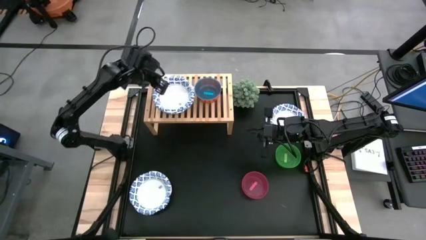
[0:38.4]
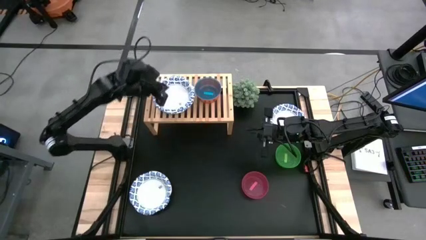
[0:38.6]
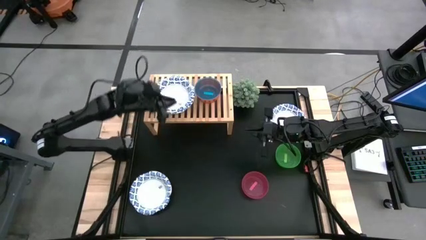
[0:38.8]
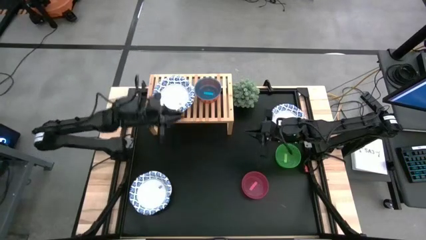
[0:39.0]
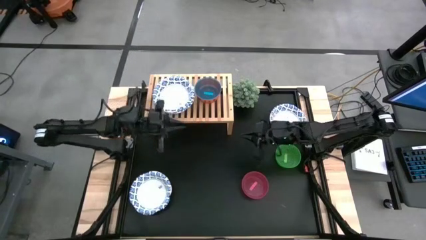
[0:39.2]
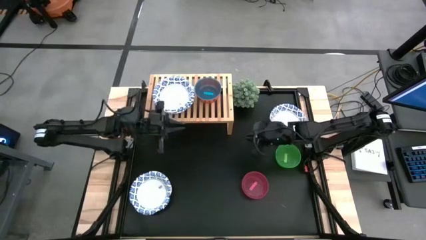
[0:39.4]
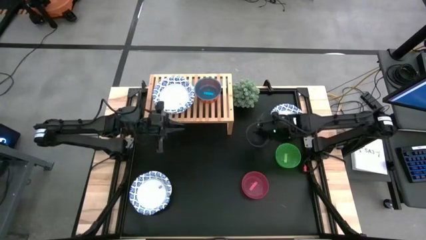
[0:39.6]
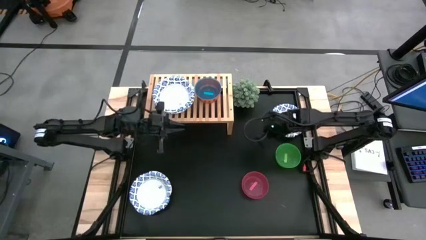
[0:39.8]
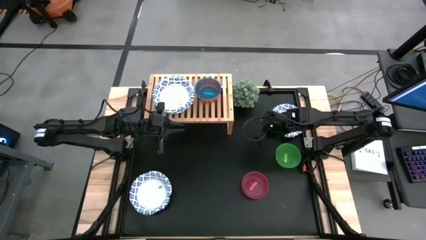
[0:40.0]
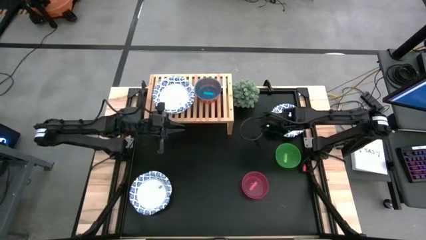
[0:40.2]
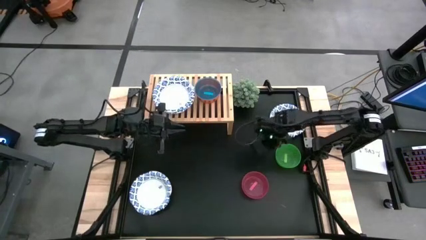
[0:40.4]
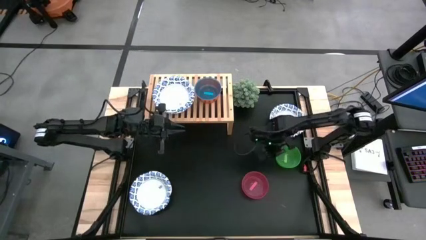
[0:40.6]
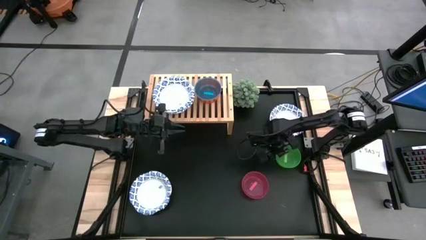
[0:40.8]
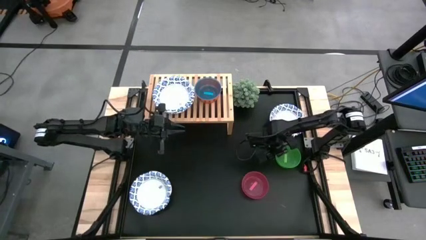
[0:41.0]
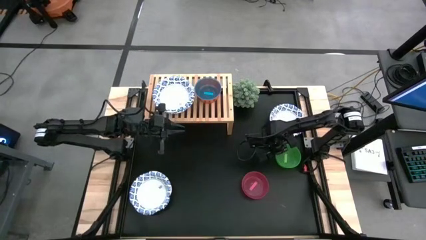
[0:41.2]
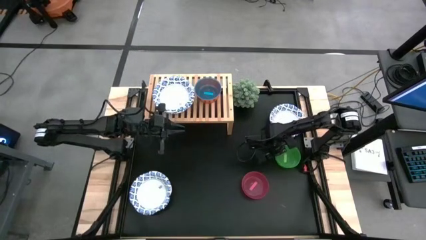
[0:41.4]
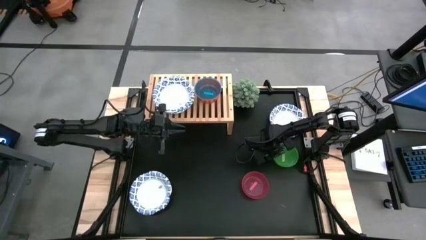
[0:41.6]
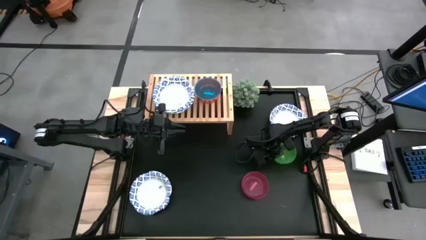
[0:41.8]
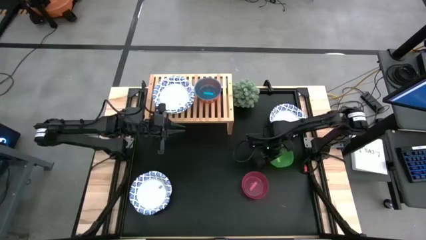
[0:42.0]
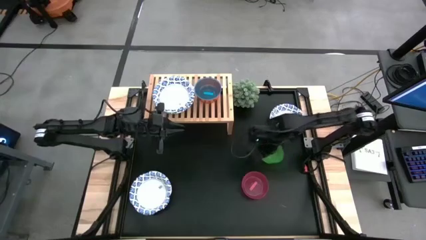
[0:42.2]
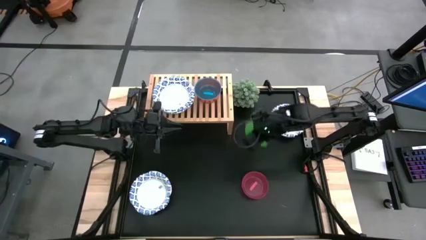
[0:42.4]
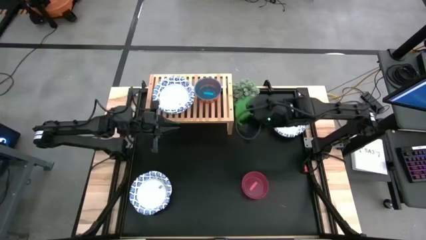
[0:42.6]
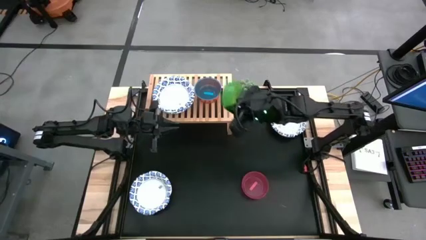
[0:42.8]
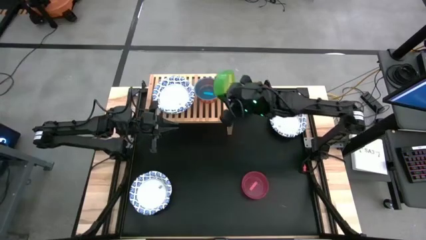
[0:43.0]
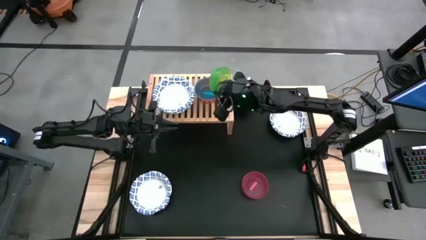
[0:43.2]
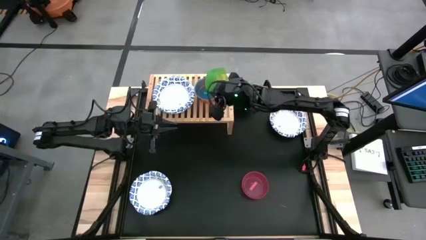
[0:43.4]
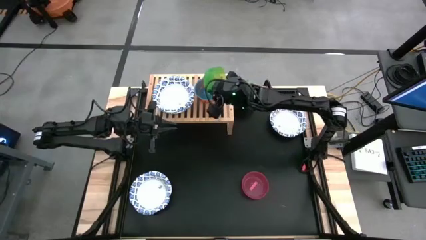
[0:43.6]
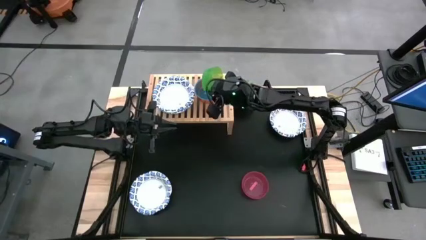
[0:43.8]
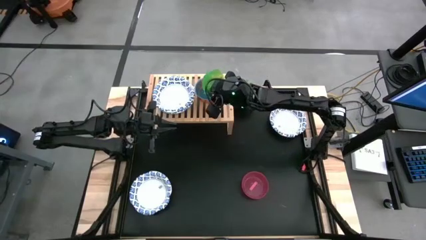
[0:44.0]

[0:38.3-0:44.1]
Task: Place and stack bowls onto a shelf
Stack the green bowl on top of the blue bowl on the shelf

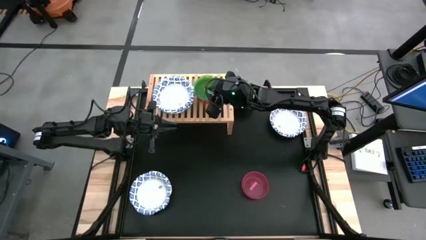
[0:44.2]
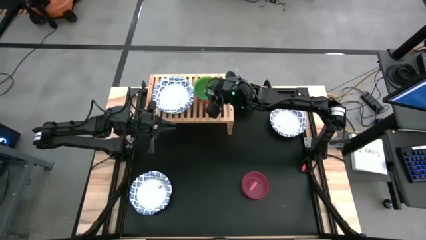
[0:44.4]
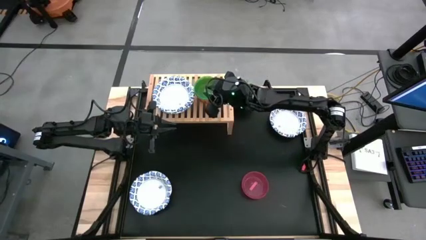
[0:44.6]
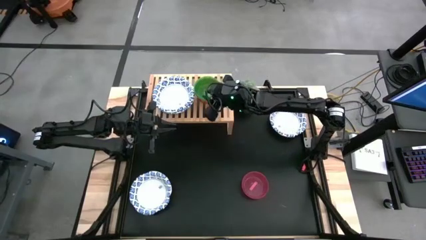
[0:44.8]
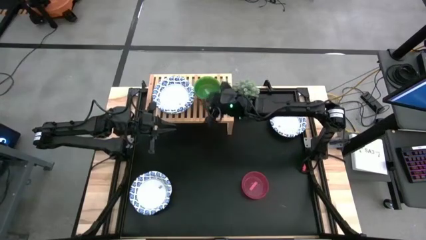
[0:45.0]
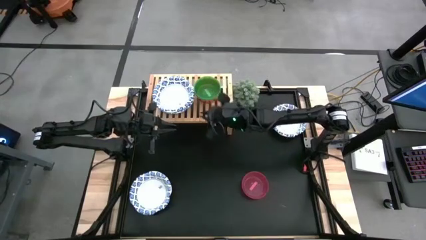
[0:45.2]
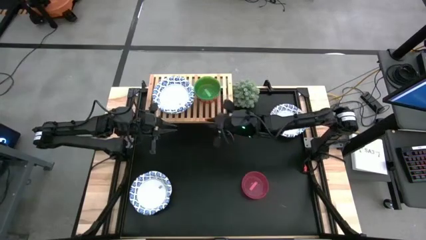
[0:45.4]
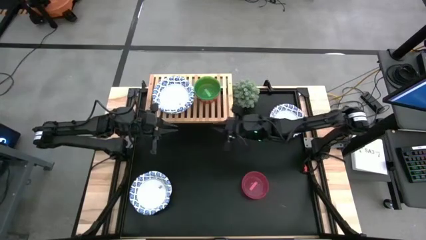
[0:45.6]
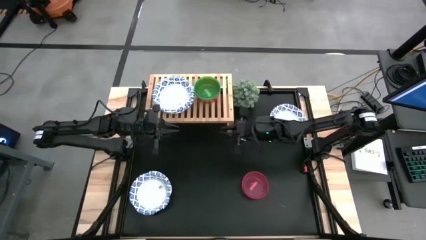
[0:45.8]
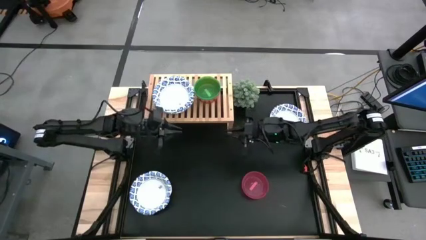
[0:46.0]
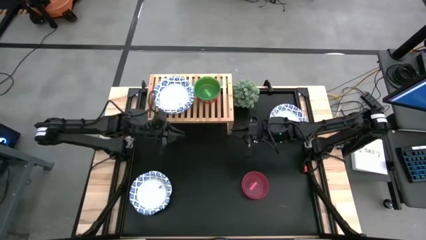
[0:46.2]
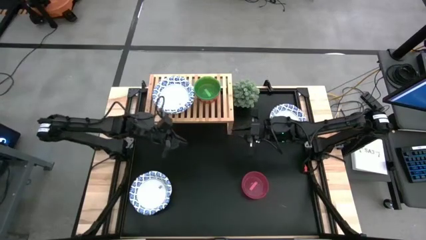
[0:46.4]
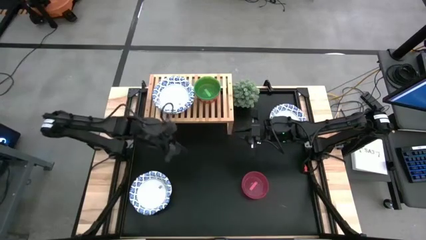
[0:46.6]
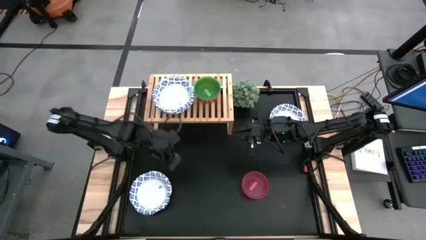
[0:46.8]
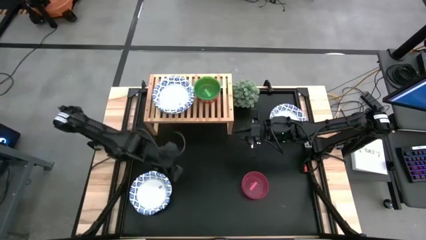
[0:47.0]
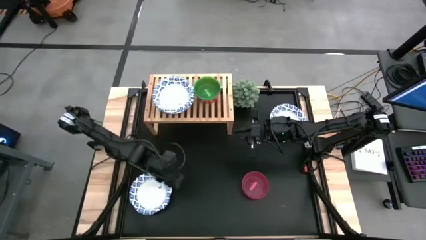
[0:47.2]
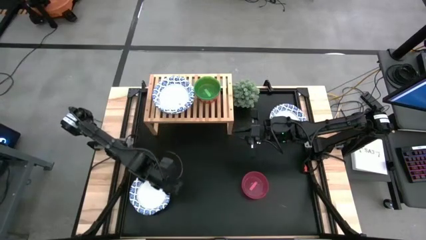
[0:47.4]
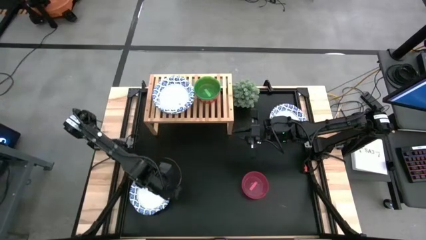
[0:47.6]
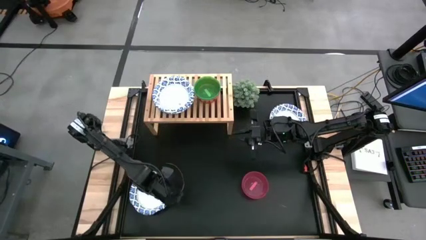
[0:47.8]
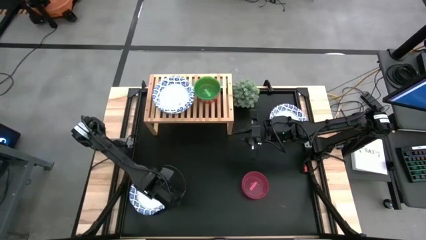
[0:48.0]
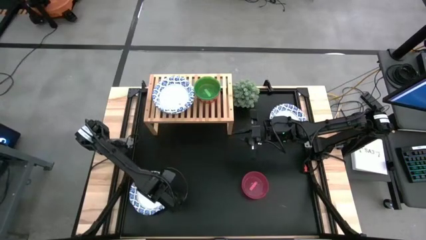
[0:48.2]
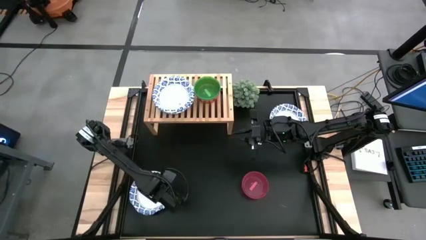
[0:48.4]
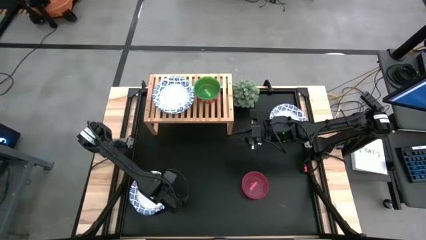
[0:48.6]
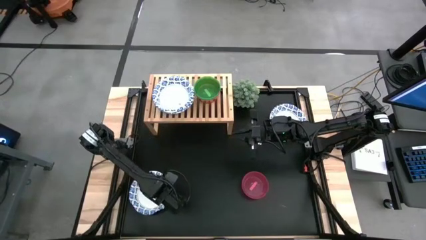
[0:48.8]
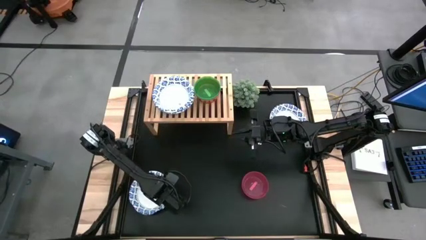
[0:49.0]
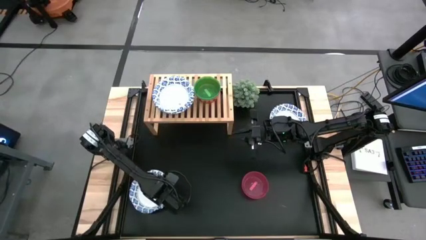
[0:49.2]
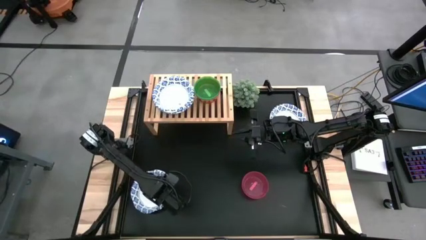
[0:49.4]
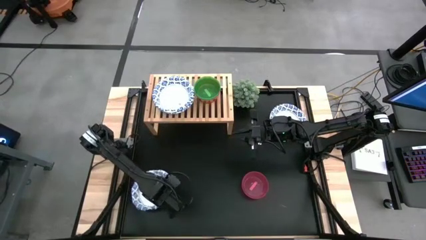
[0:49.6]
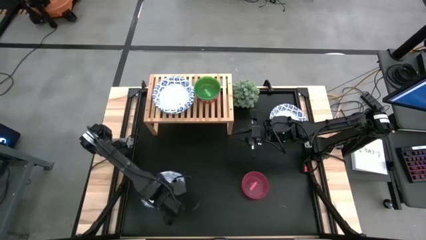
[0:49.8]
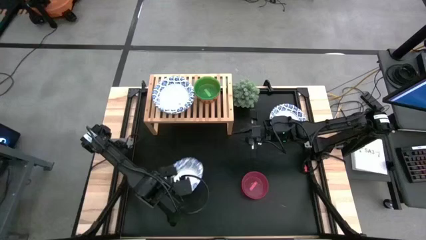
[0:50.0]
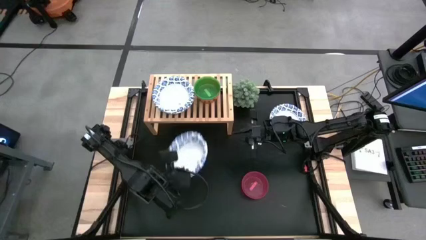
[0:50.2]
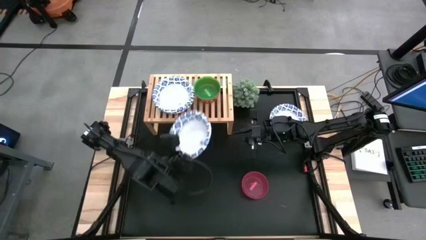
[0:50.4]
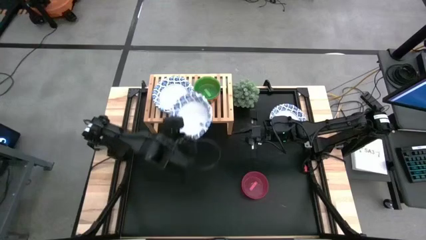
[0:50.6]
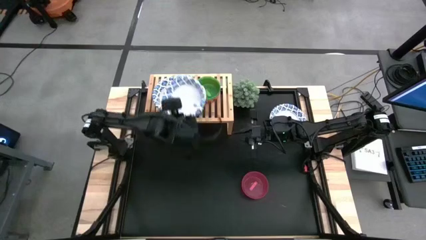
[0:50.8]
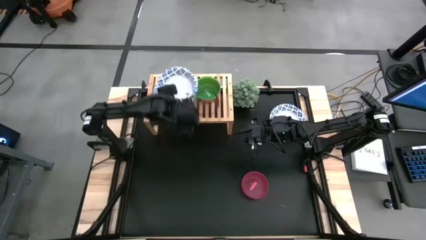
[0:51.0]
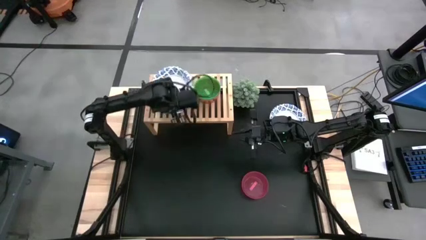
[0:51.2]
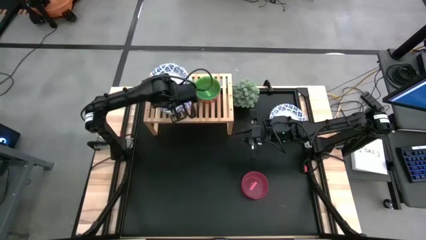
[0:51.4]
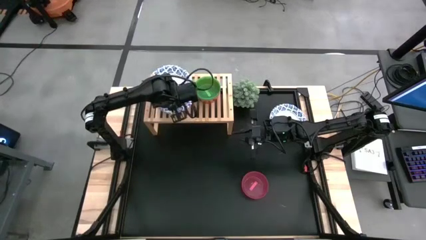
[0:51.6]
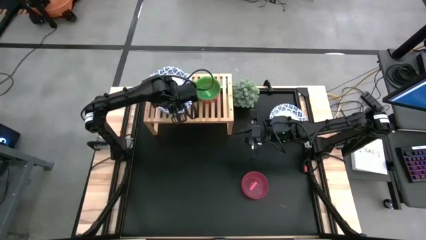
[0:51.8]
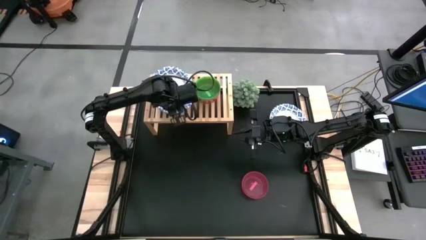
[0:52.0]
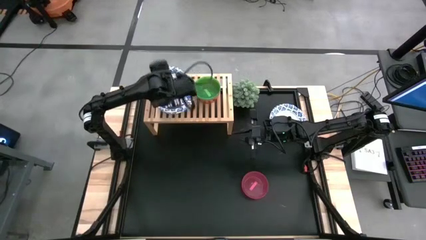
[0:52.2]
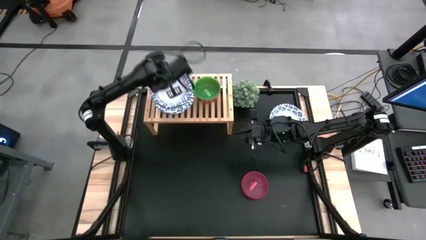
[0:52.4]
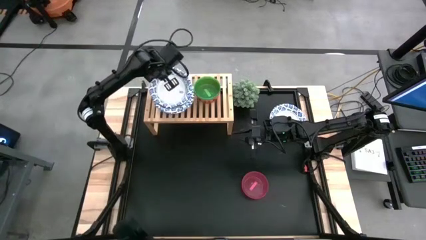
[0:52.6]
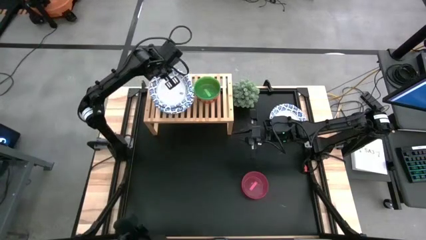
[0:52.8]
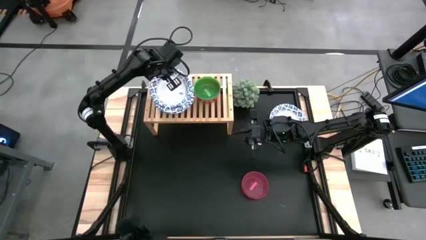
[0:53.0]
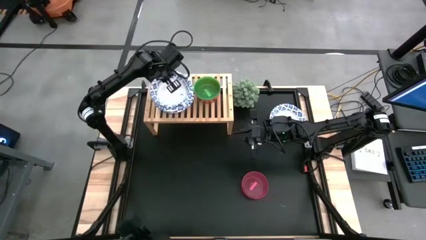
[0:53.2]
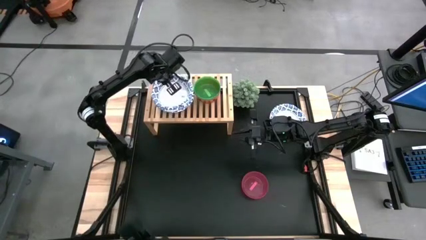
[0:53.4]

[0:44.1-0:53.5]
Stack the white patterned bowl on top of the white patterned bowls on the shelf
